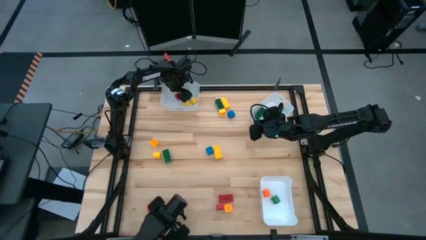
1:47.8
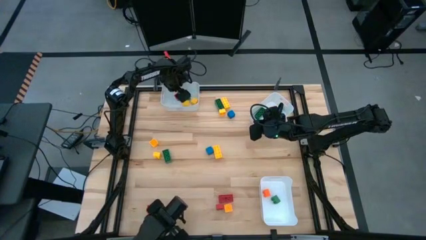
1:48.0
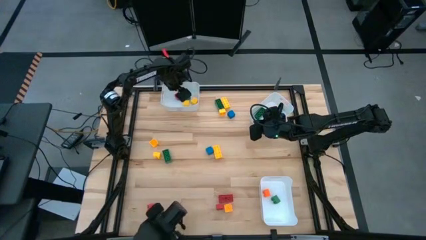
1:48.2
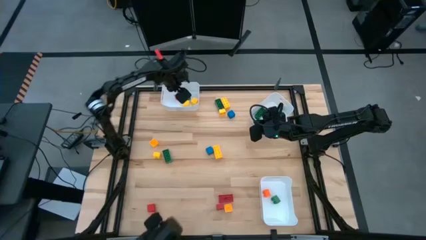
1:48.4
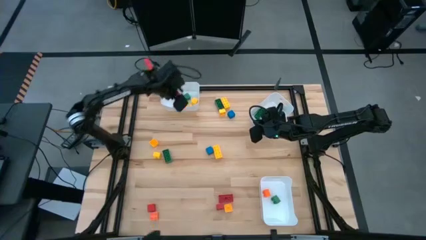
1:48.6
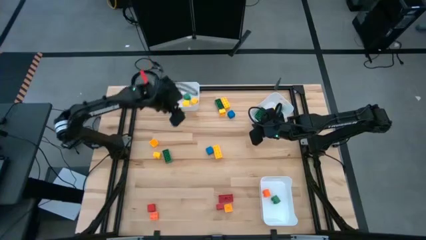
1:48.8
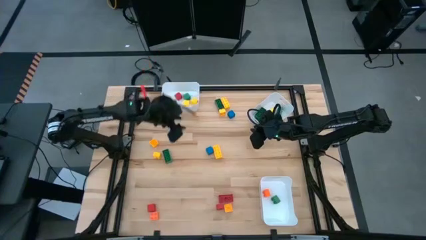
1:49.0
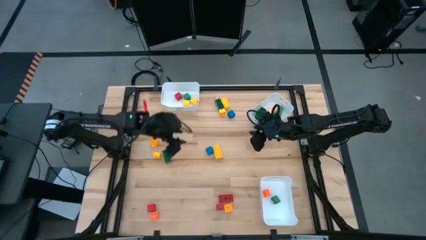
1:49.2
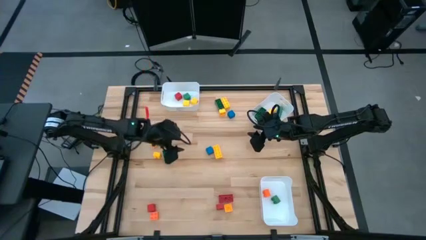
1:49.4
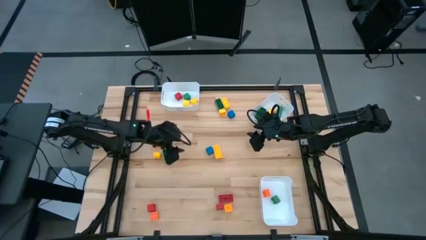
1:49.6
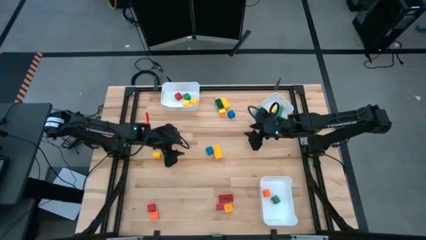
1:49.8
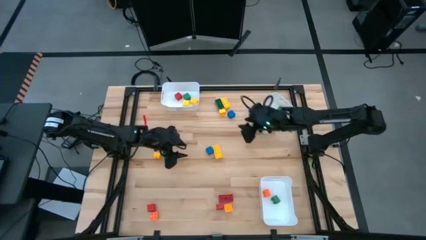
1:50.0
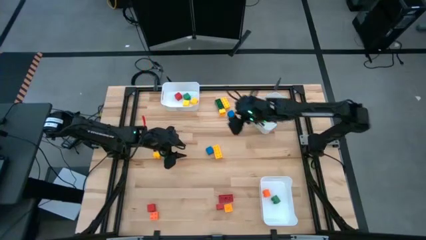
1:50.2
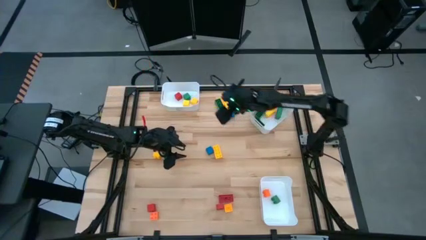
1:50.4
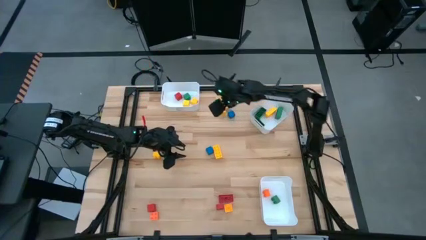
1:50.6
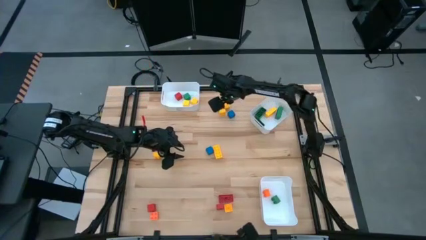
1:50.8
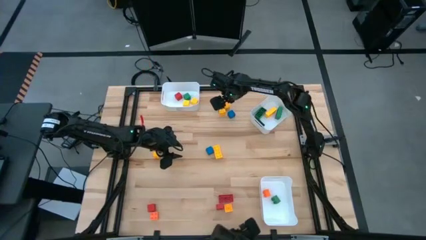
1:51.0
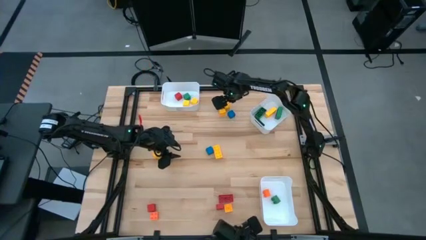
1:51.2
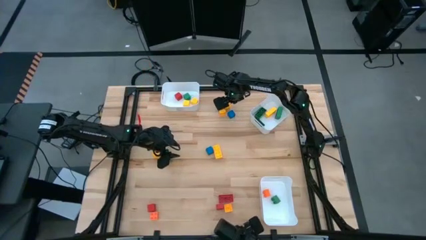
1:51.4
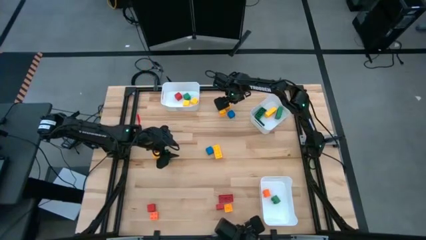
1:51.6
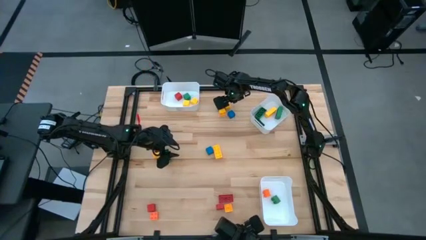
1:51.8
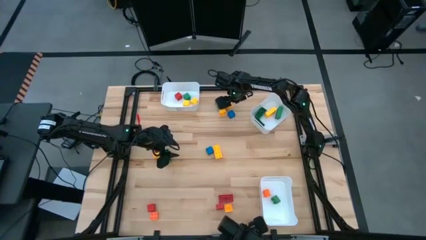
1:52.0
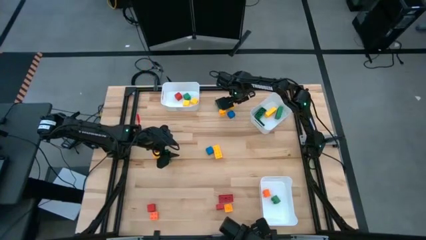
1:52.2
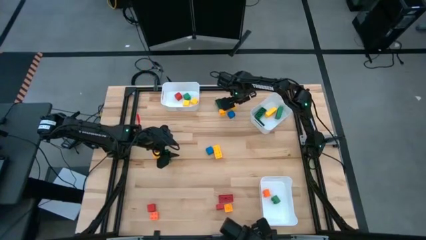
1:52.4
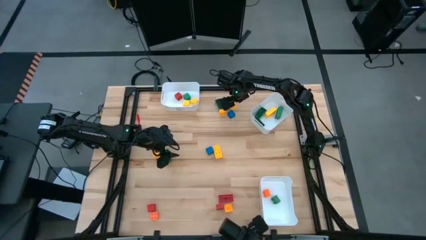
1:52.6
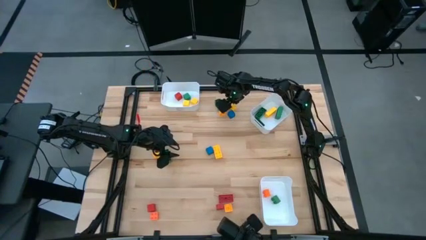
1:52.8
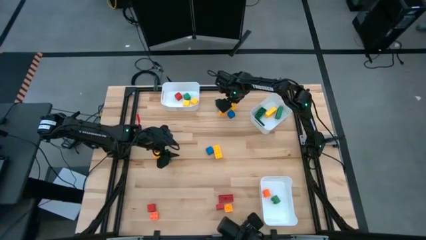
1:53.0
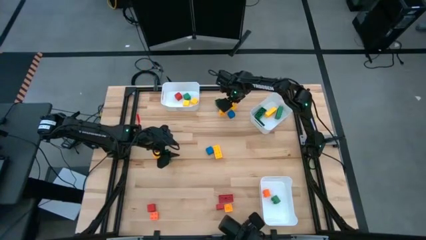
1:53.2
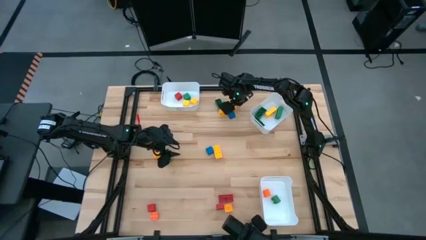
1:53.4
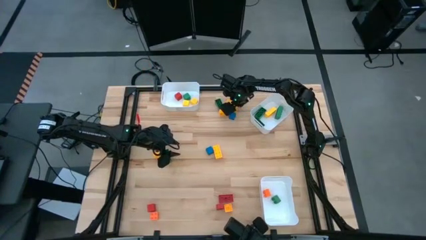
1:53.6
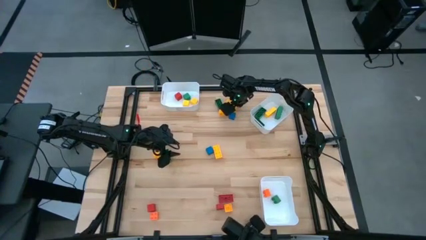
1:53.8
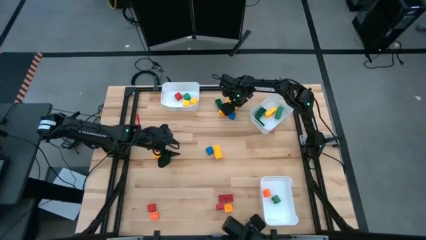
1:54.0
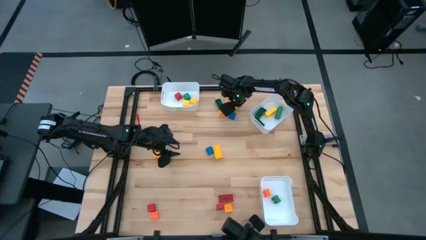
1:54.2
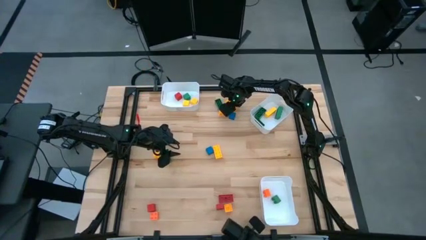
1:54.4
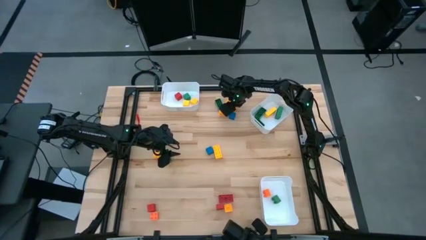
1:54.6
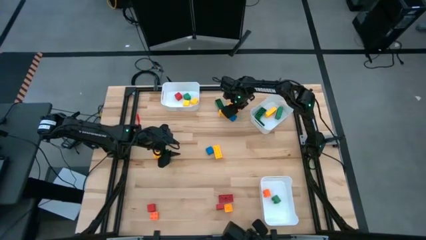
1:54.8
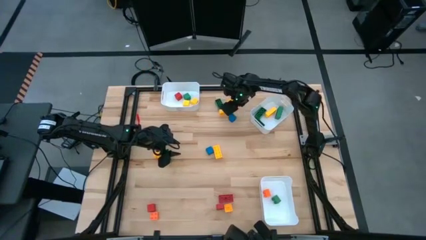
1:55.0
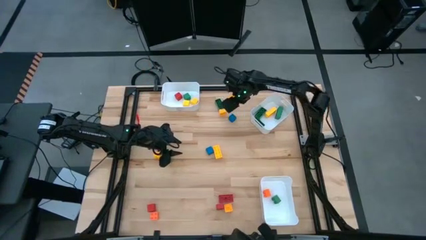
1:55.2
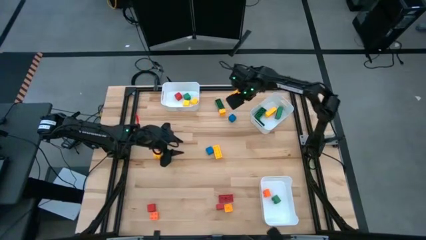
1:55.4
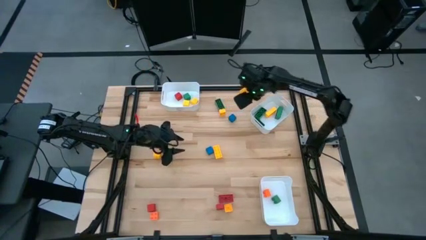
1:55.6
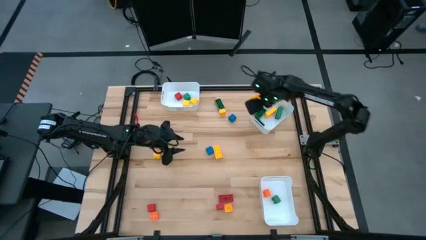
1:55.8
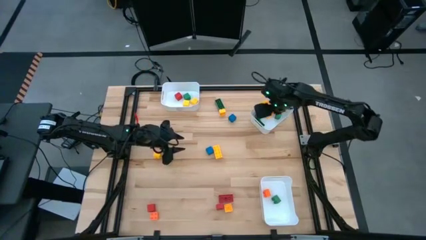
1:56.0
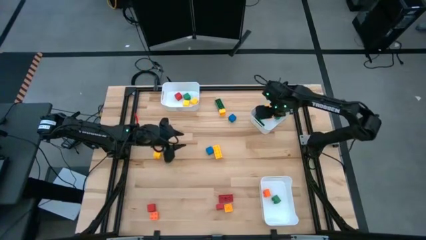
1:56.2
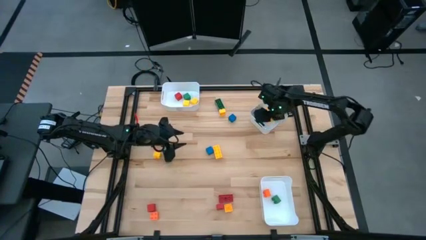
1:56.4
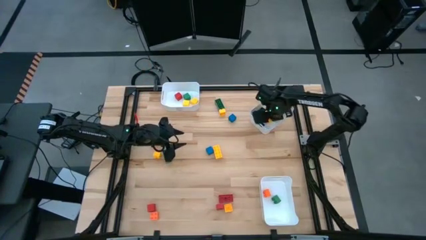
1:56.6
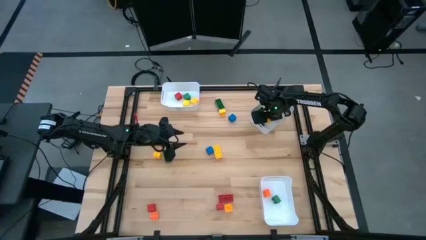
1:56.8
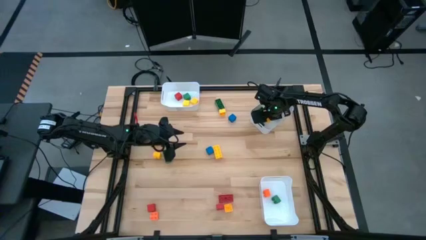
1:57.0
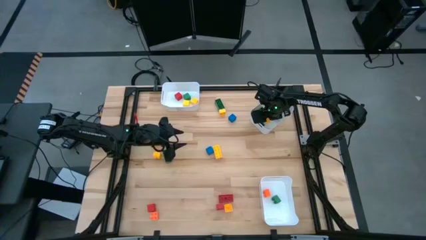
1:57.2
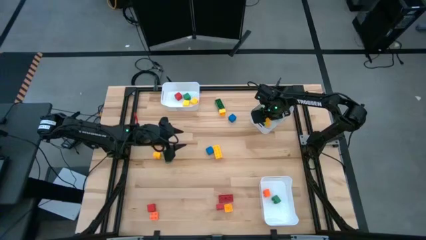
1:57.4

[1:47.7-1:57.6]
Task: Sort blocks by size
Put the yellow 8 stud gamepiece into the top right white bin

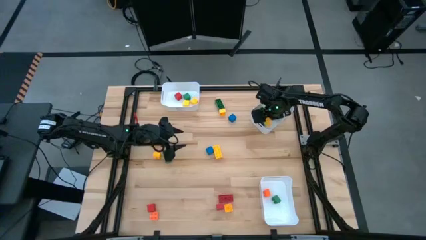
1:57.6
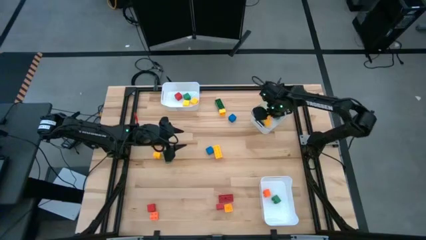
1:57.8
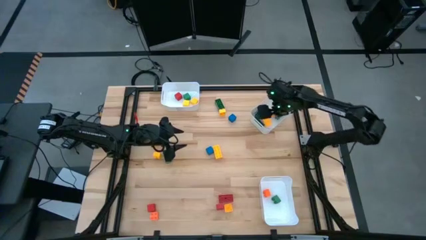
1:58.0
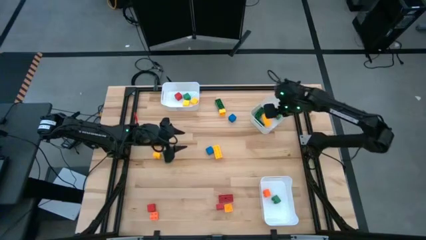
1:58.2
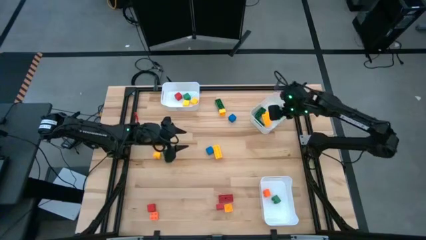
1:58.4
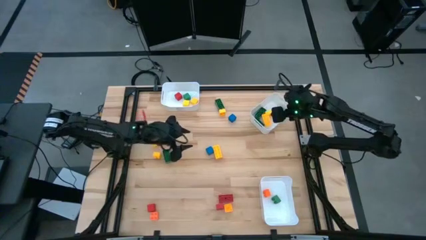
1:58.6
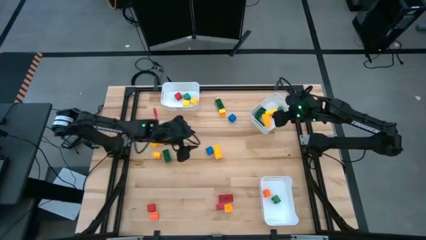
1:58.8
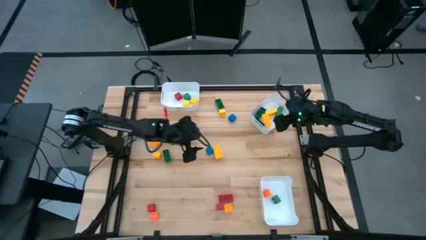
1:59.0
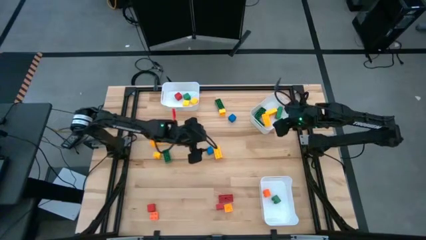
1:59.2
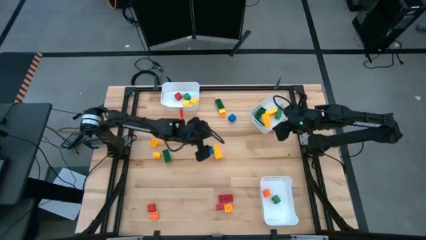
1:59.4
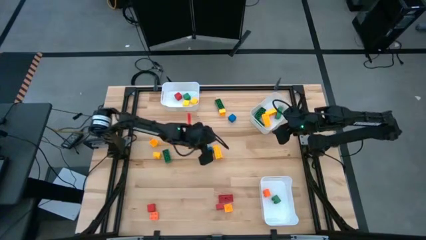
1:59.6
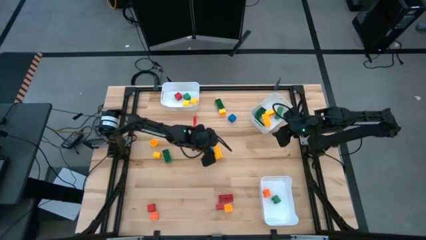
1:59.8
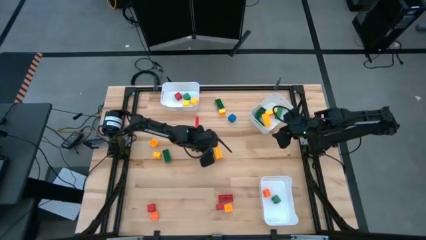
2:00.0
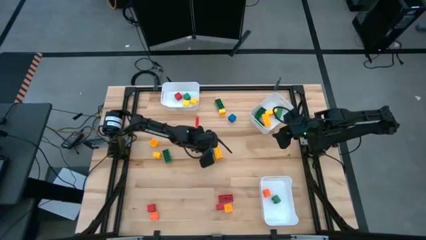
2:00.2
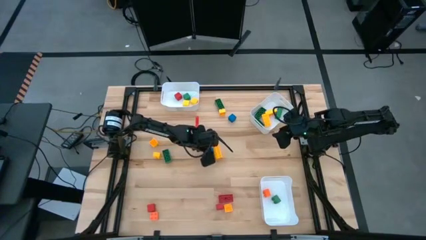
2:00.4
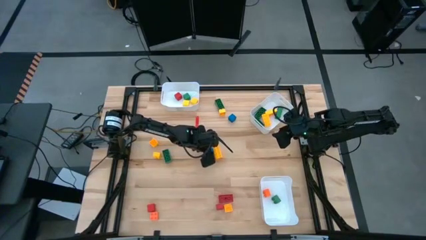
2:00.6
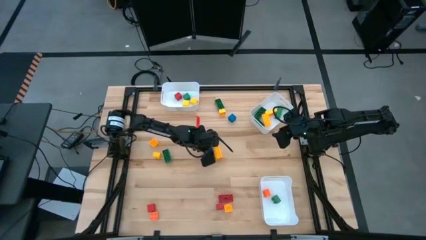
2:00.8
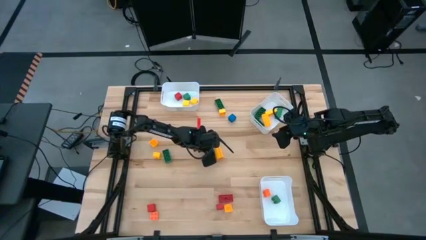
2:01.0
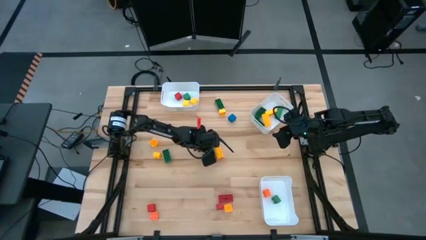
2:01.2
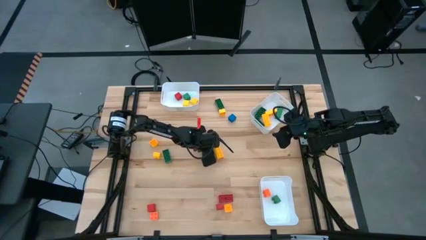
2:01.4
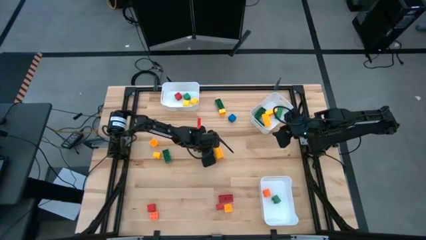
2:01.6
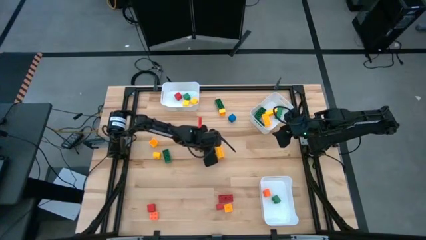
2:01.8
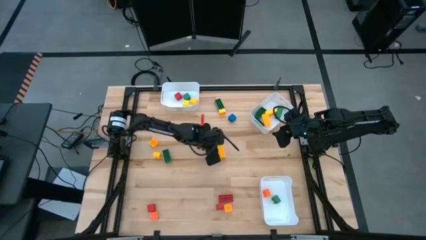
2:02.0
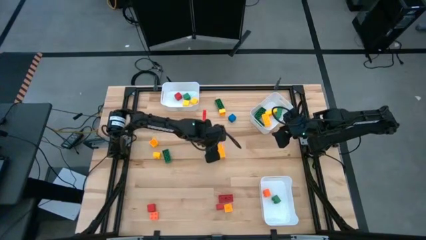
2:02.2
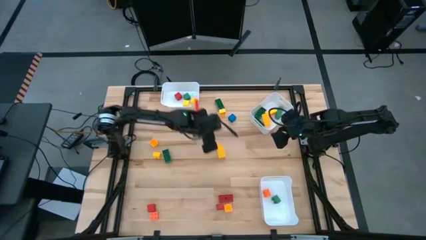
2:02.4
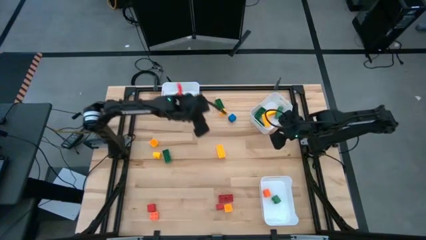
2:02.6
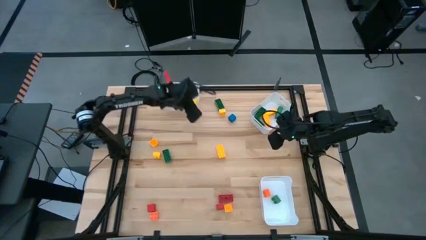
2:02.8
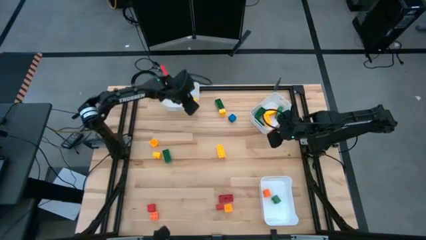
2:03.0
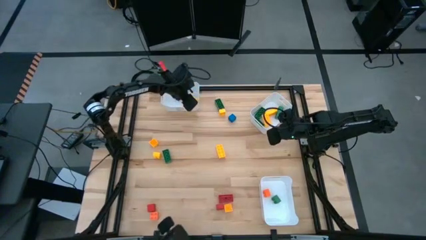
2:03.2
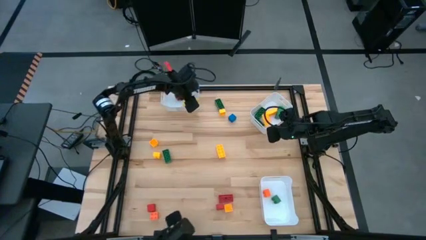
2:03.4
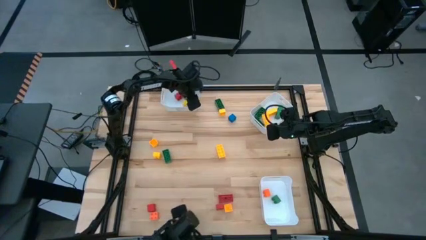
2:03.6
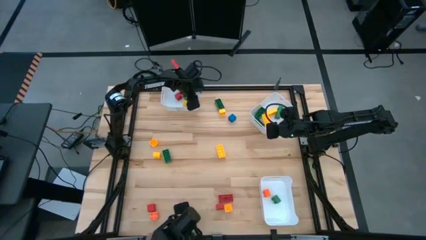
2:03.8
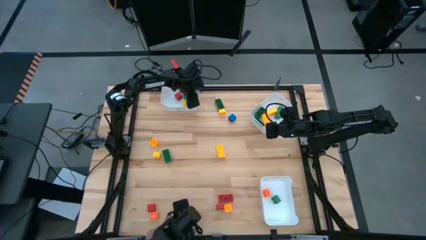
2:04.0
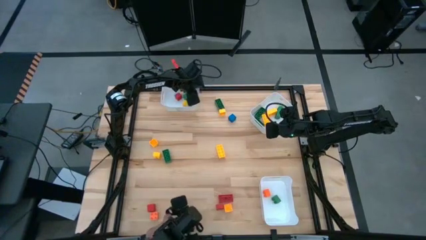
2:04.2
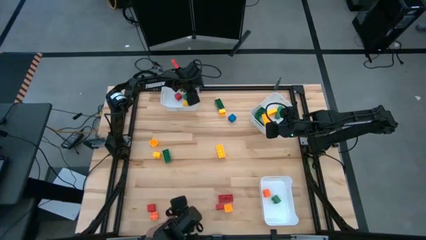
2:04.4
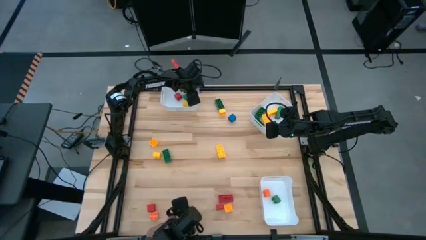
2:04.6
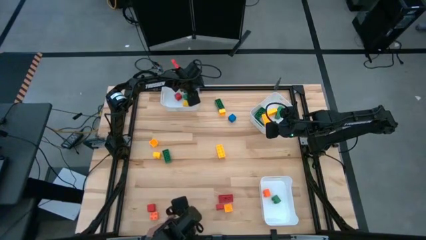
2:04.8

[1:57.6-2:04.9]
Put the blue square block into the top left white bin
